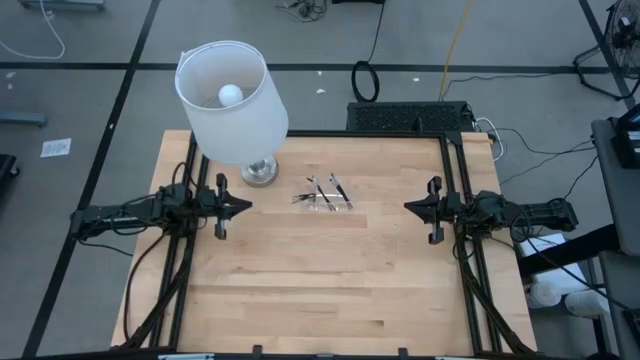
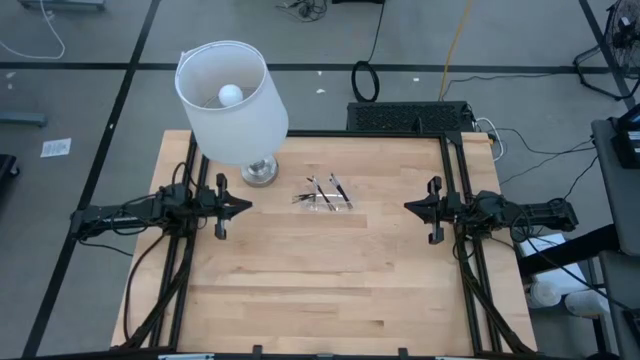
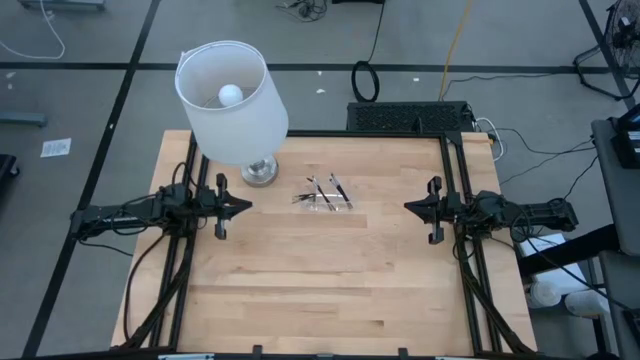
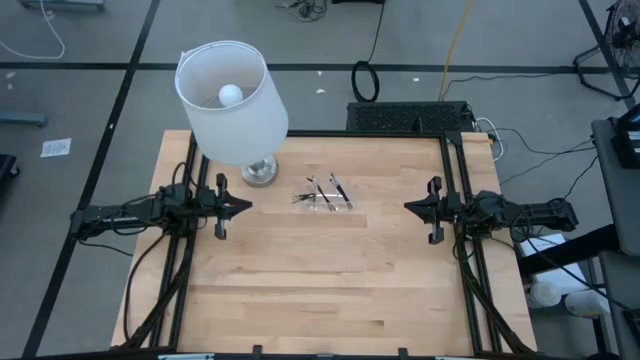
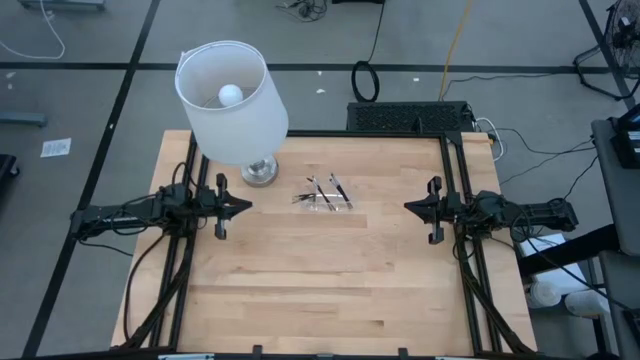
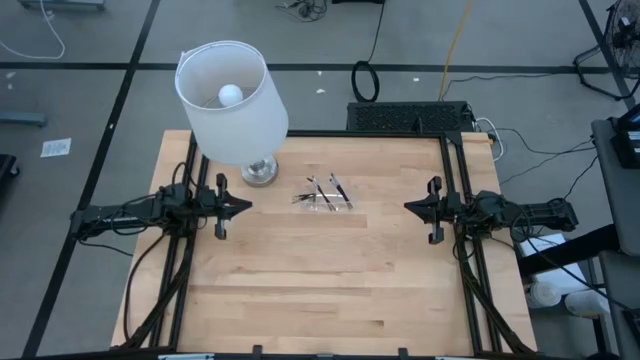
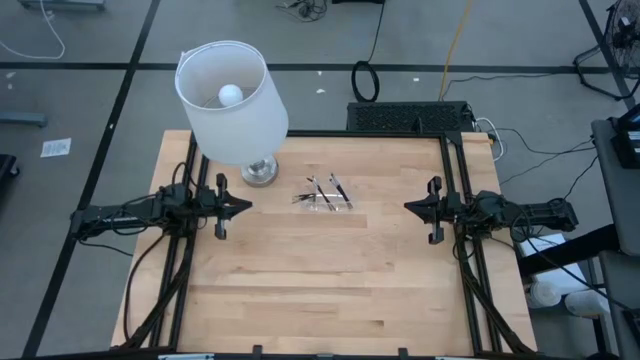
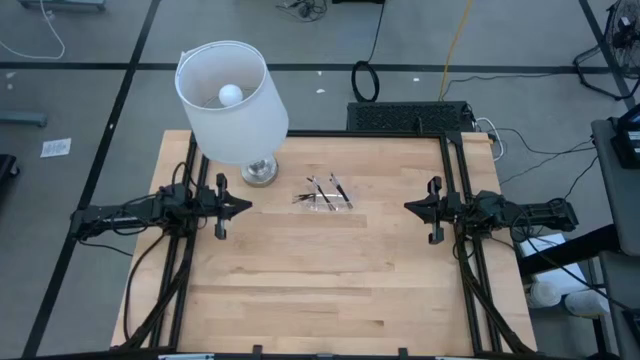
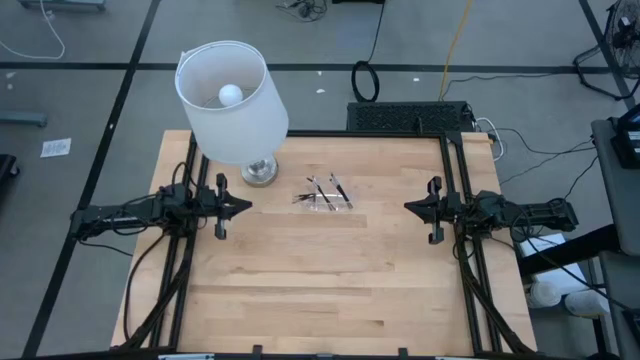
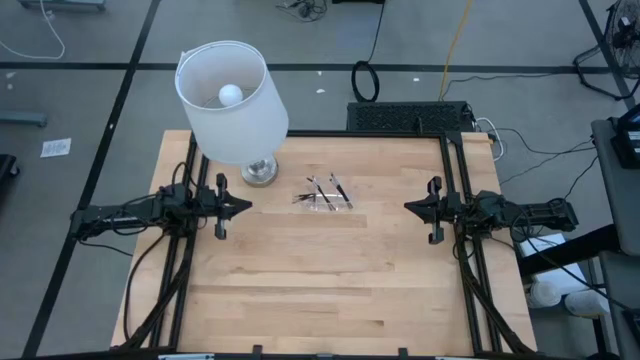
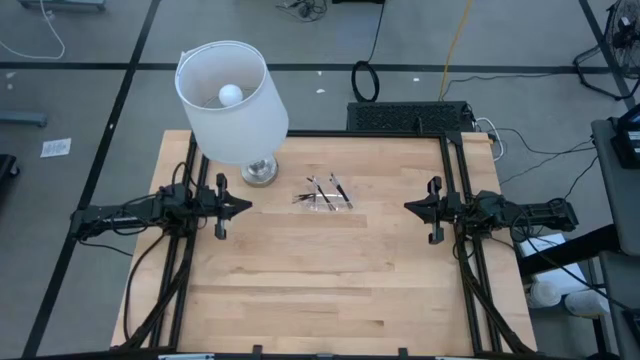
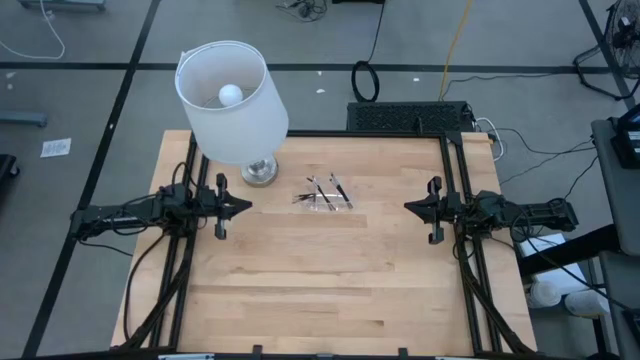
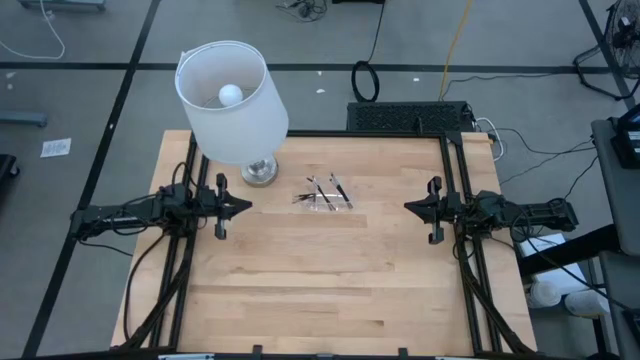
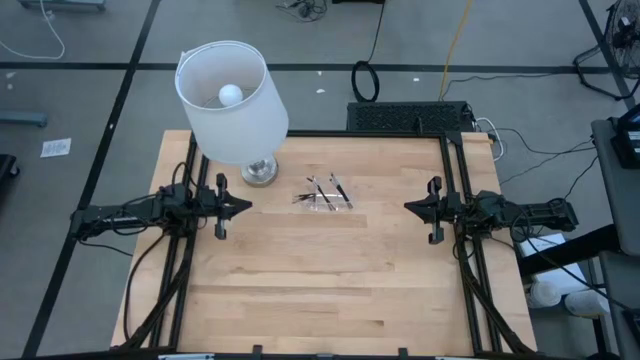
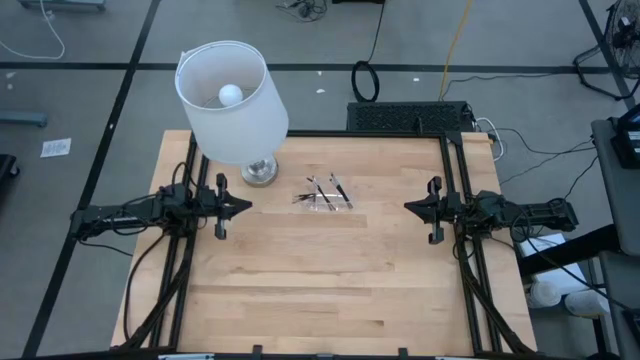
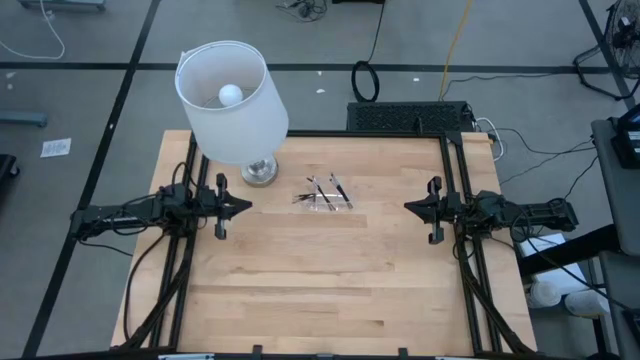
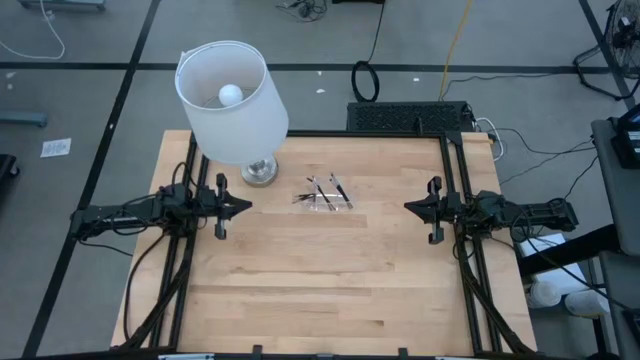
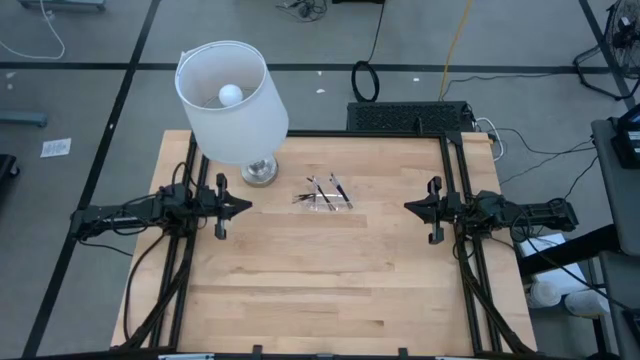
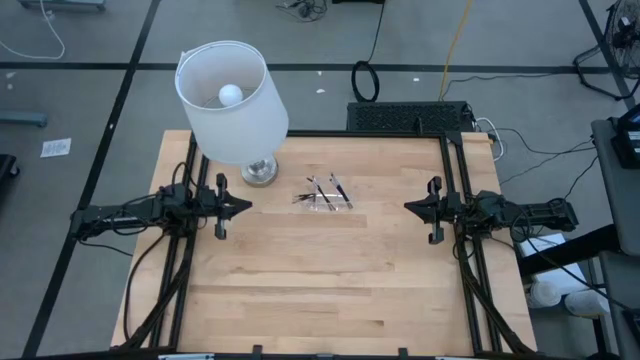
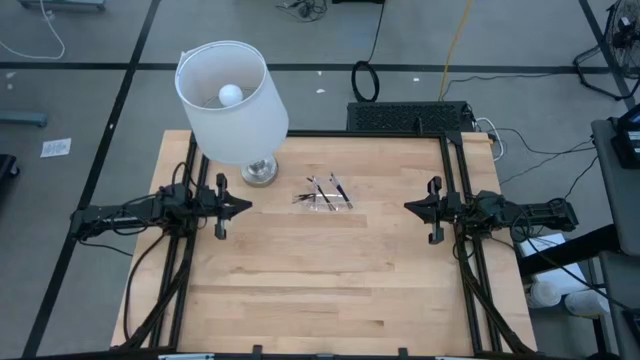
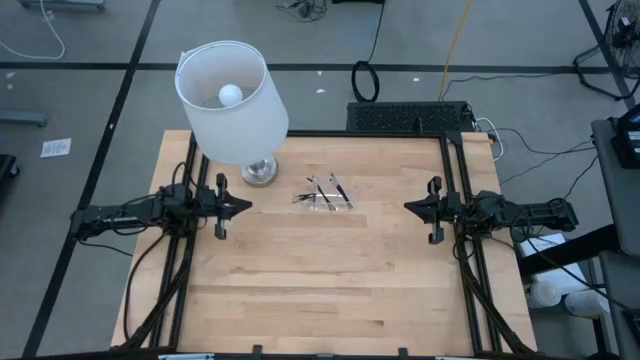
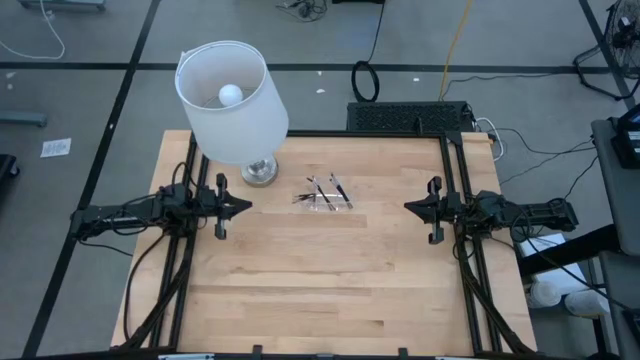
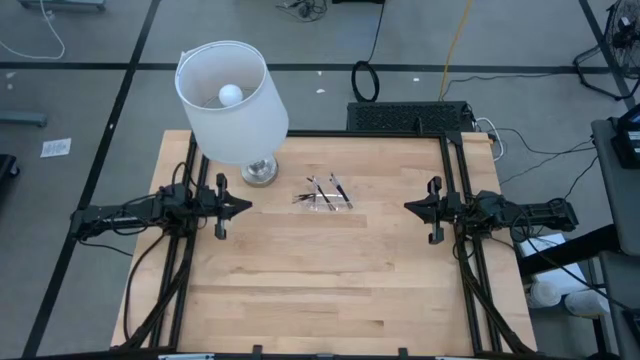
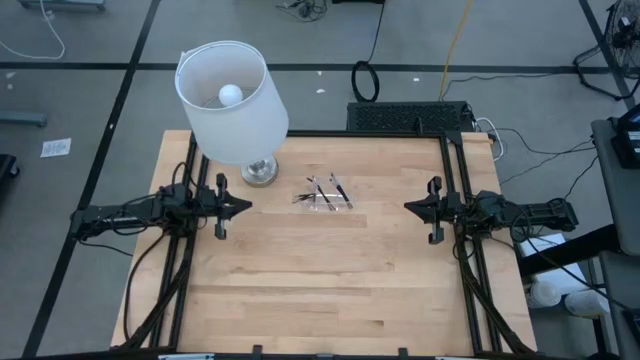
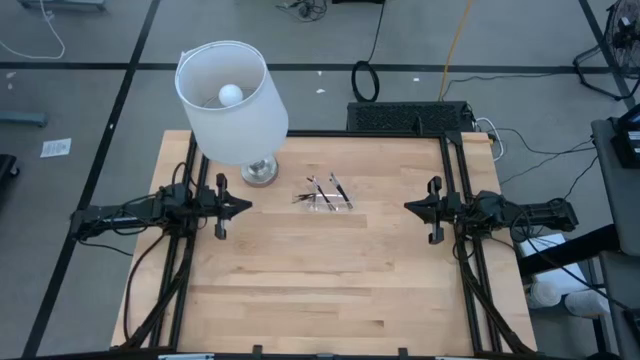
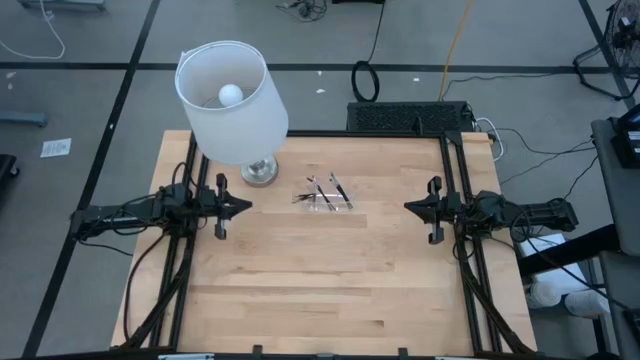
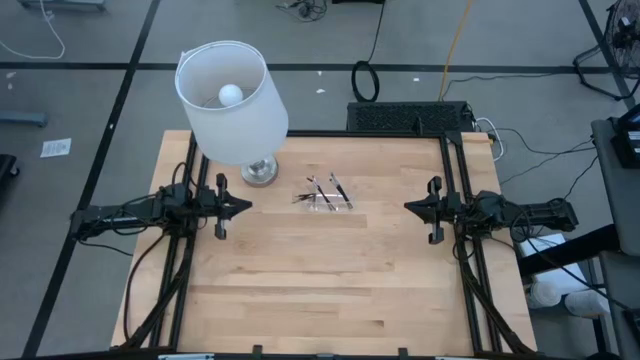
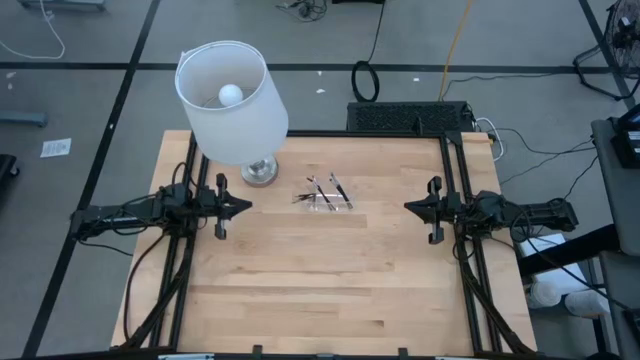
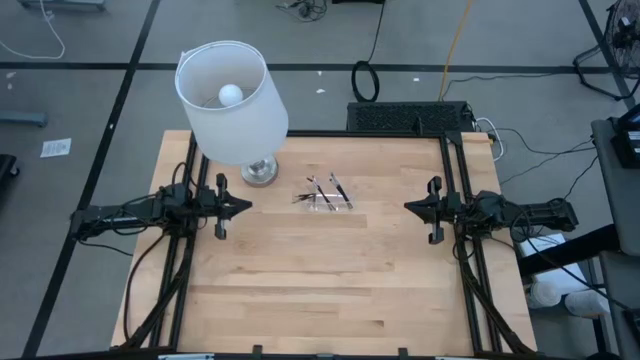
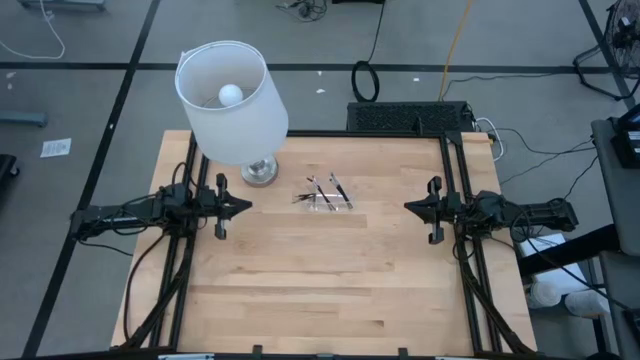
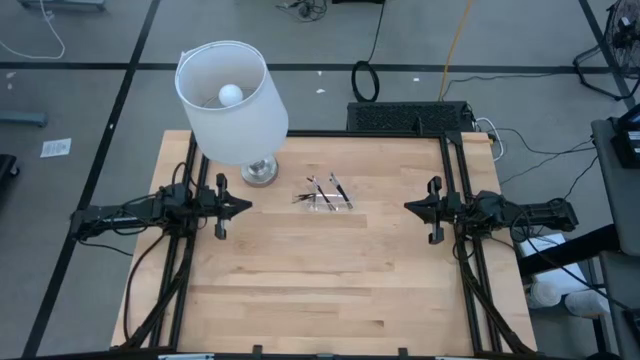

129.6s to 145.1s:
Task: Put items in baskets/containers
Return to Home Position

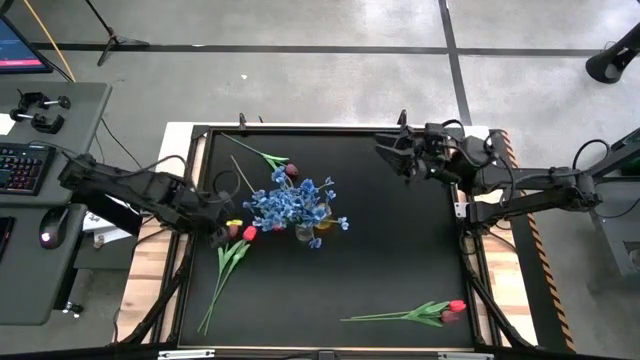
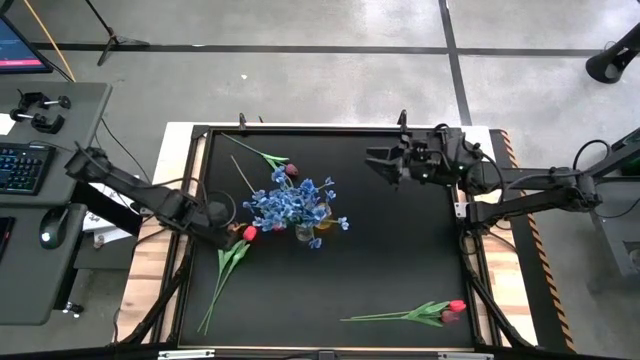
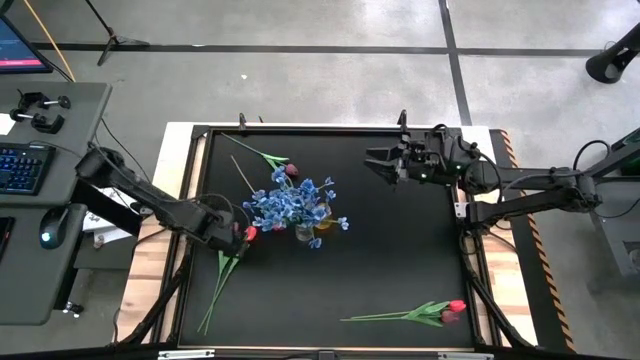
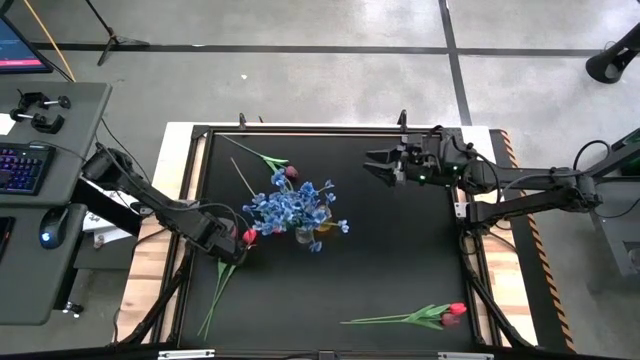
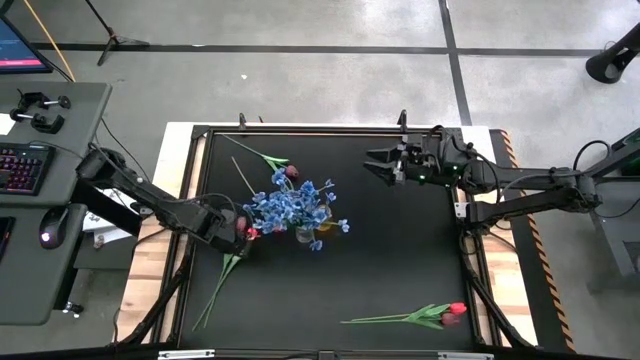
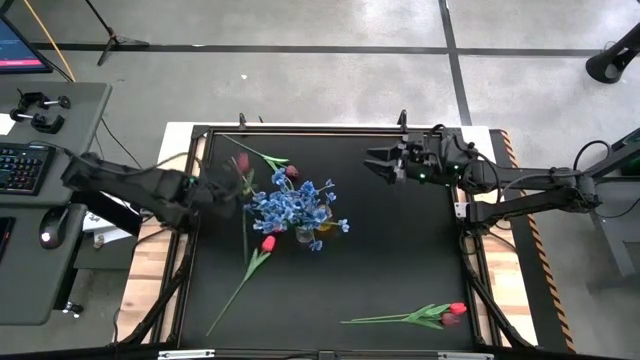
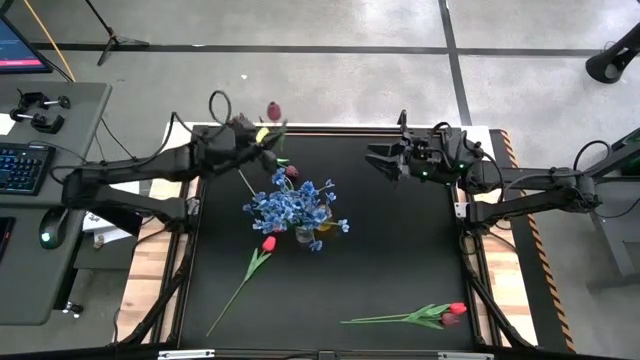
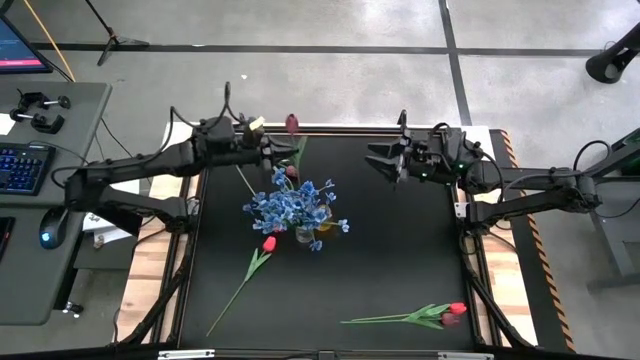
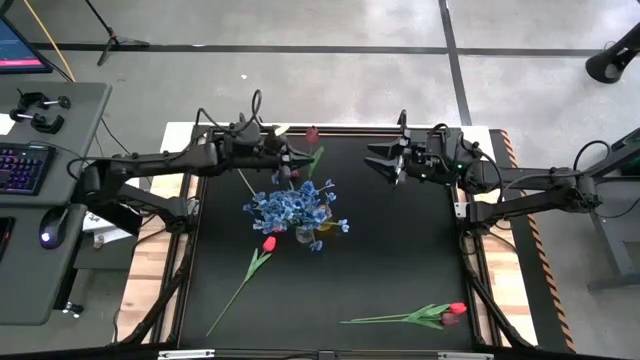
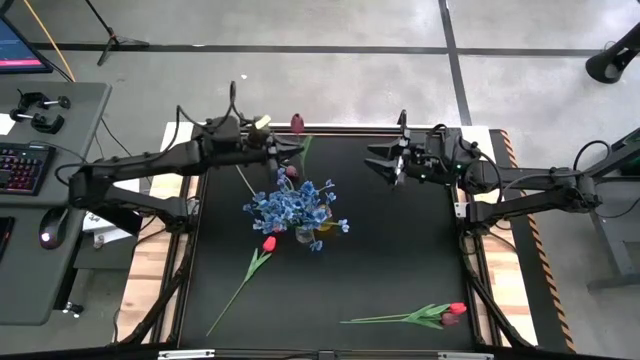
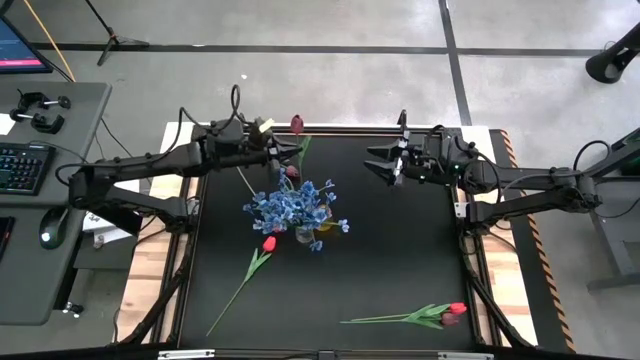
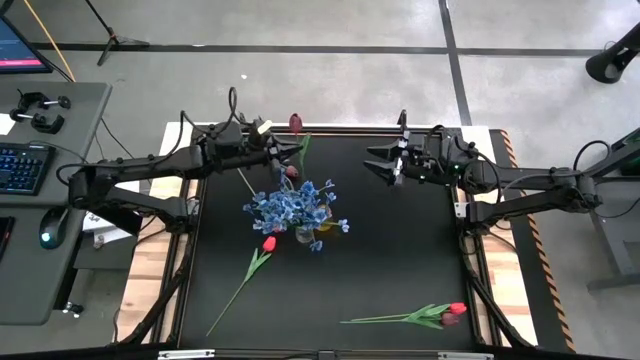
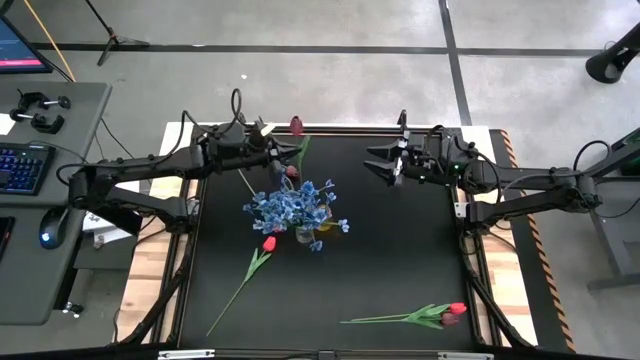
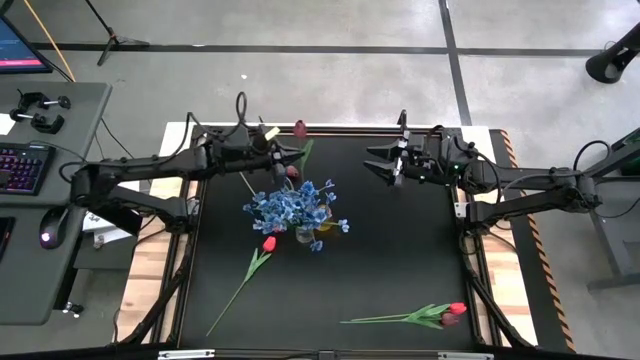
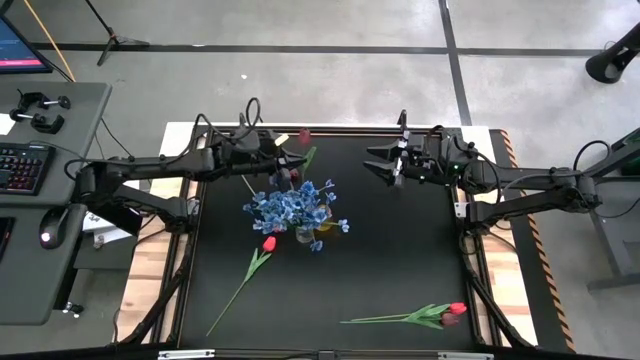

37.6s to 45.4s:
Task: Sort flowers into vase by color
Put the bottom left dark red flower into the pink vase
